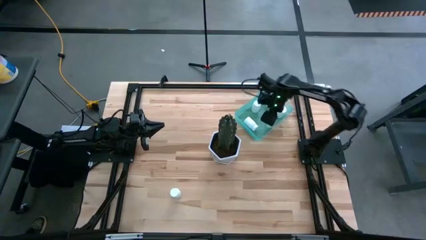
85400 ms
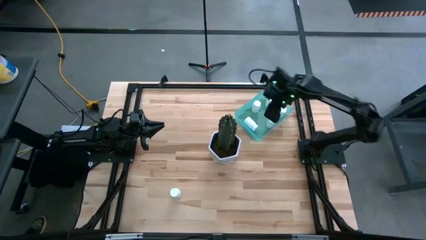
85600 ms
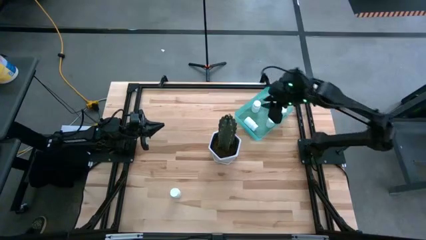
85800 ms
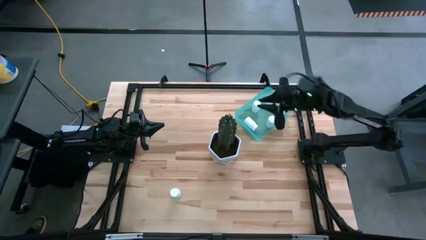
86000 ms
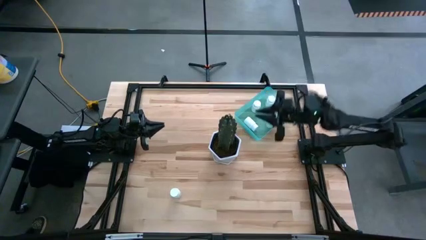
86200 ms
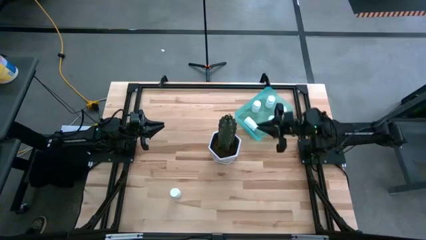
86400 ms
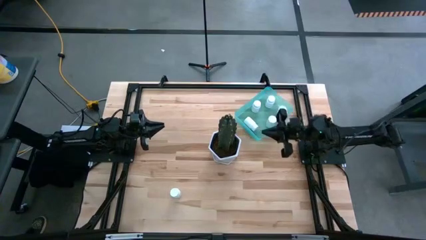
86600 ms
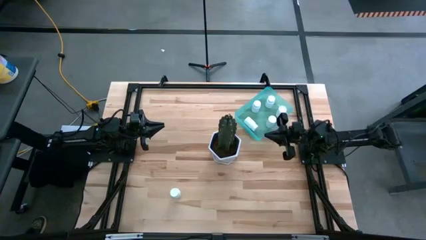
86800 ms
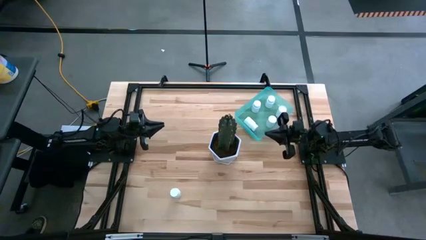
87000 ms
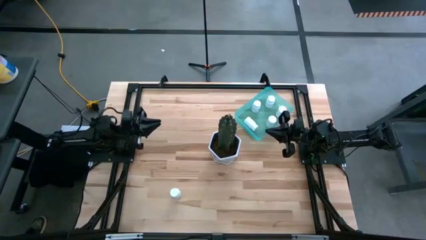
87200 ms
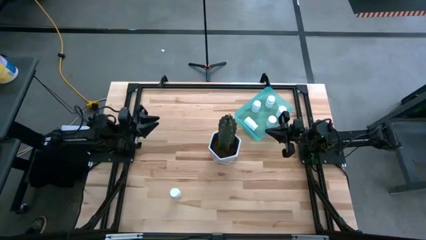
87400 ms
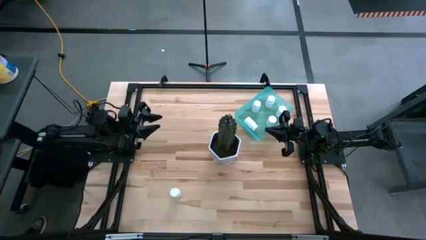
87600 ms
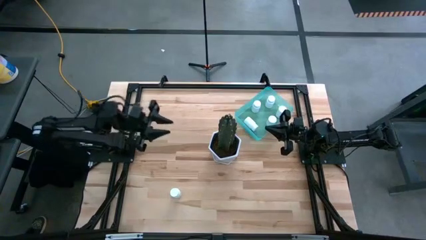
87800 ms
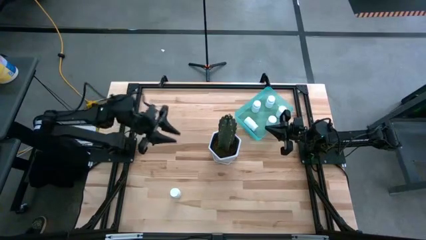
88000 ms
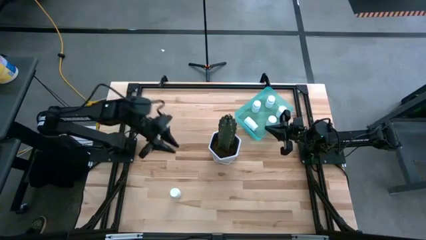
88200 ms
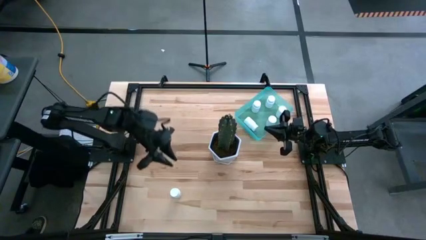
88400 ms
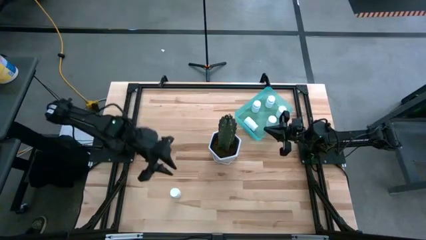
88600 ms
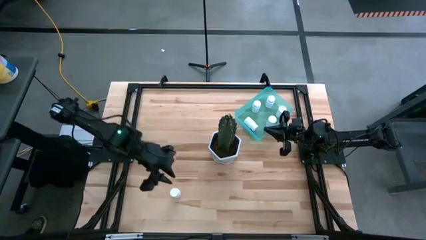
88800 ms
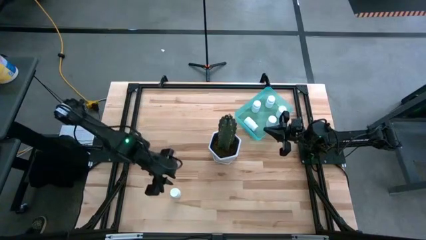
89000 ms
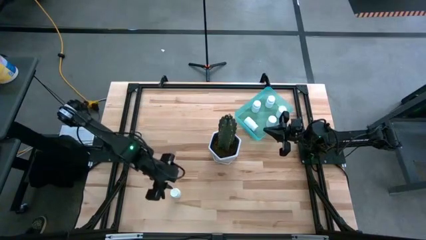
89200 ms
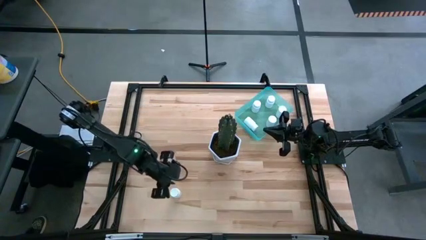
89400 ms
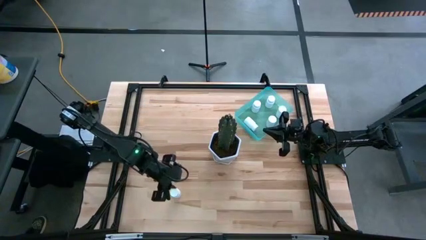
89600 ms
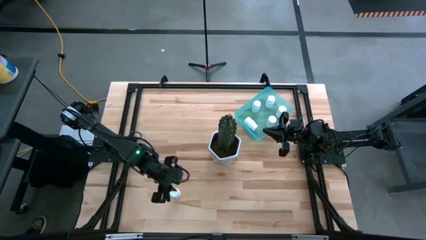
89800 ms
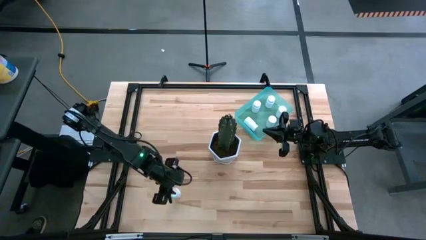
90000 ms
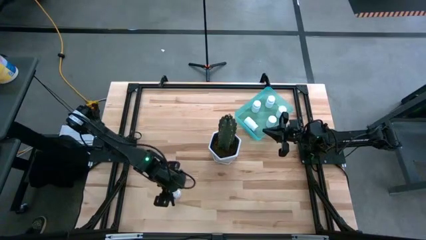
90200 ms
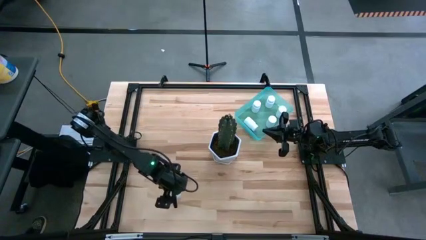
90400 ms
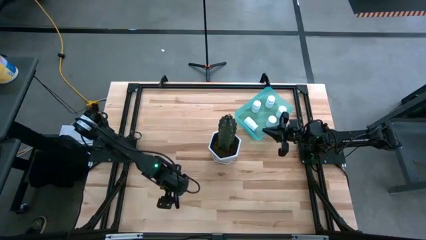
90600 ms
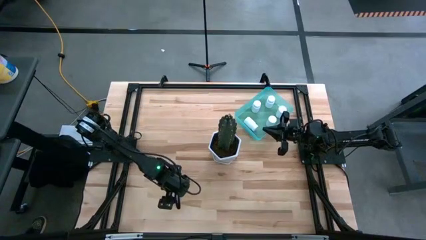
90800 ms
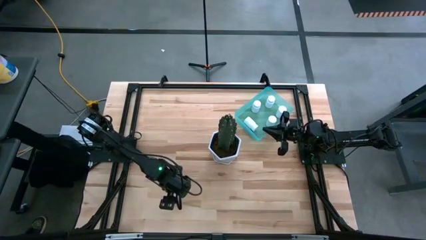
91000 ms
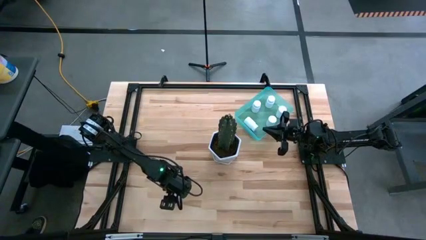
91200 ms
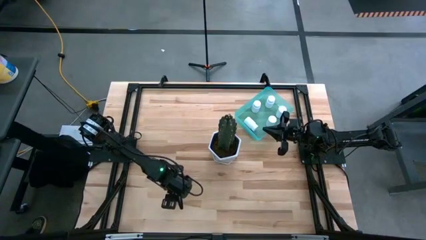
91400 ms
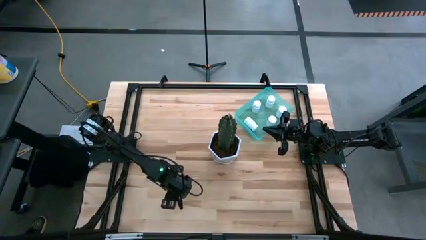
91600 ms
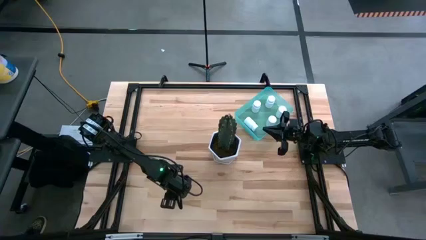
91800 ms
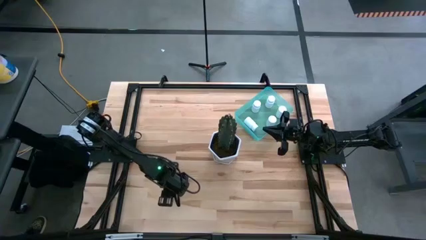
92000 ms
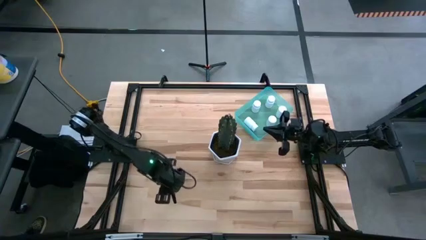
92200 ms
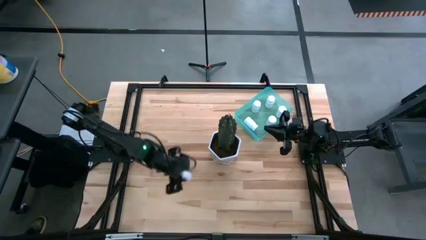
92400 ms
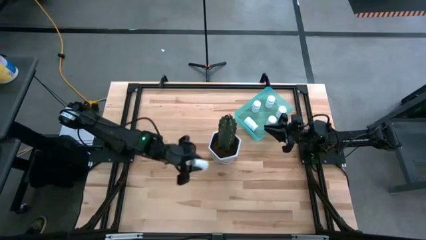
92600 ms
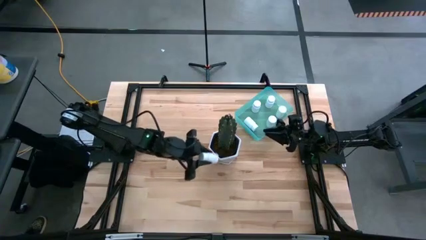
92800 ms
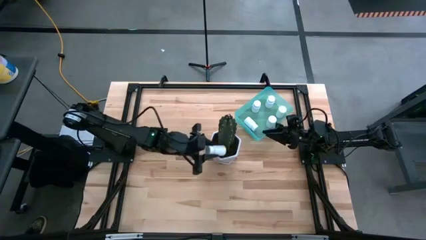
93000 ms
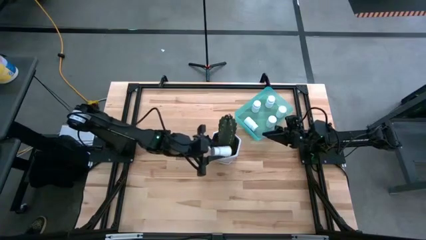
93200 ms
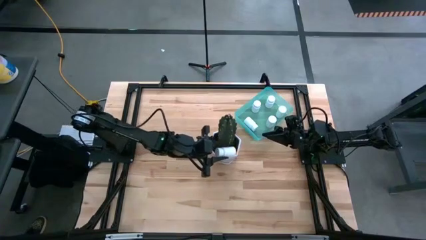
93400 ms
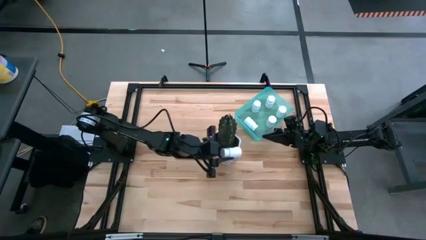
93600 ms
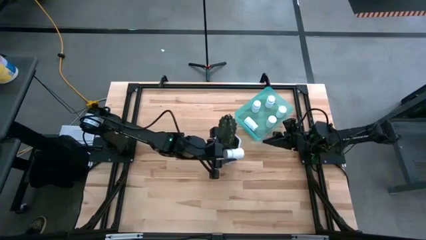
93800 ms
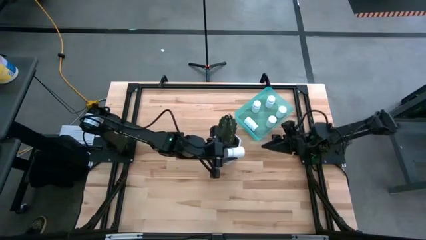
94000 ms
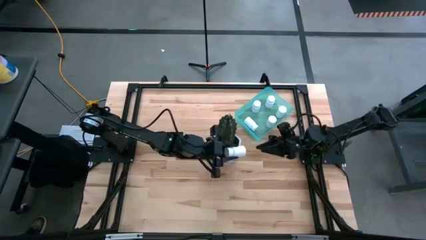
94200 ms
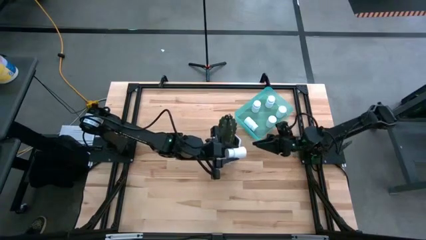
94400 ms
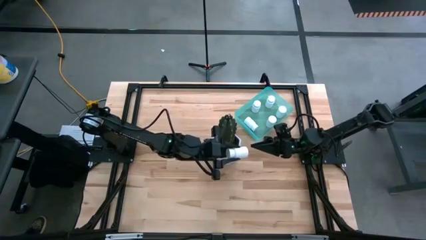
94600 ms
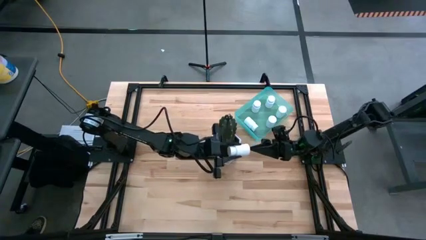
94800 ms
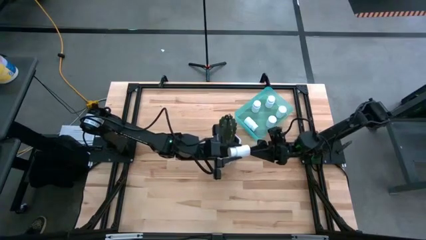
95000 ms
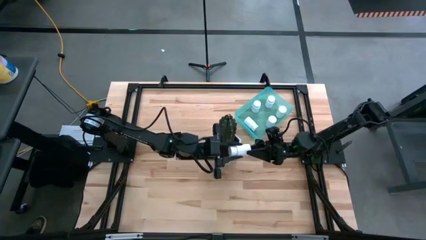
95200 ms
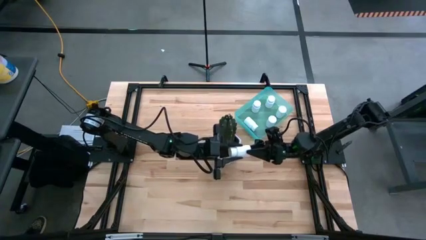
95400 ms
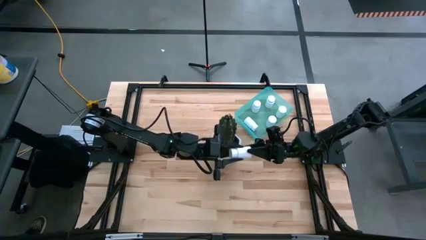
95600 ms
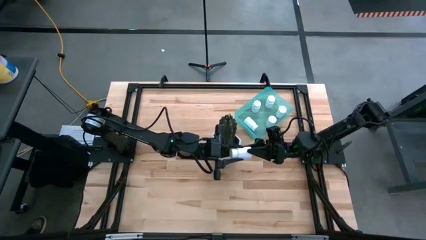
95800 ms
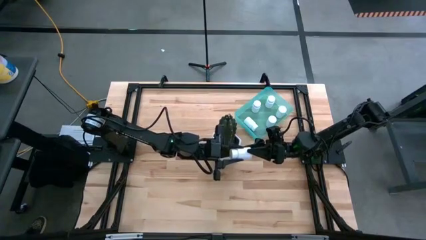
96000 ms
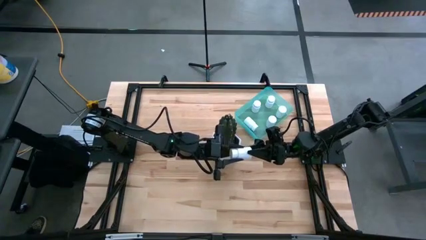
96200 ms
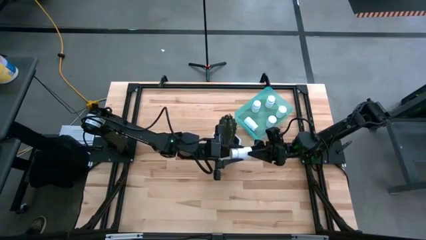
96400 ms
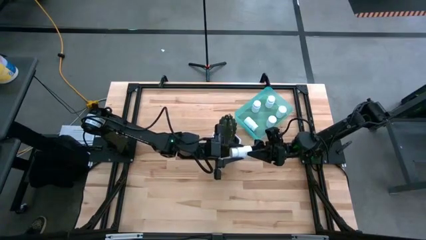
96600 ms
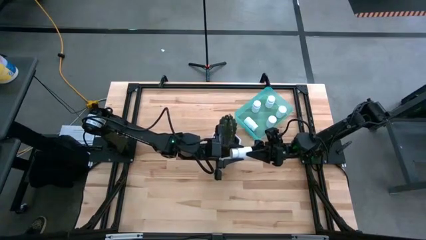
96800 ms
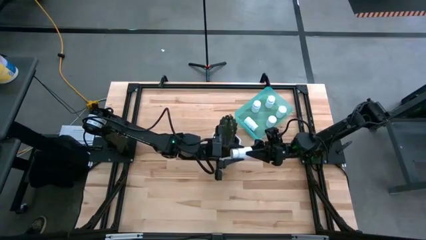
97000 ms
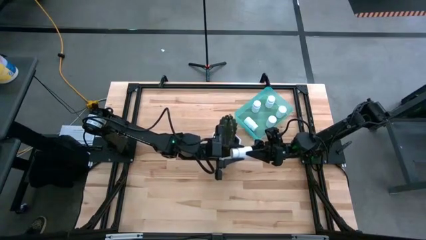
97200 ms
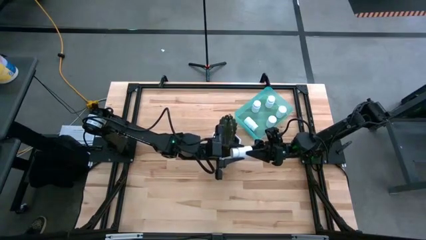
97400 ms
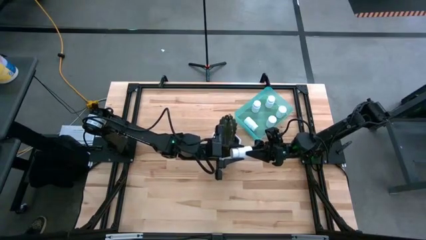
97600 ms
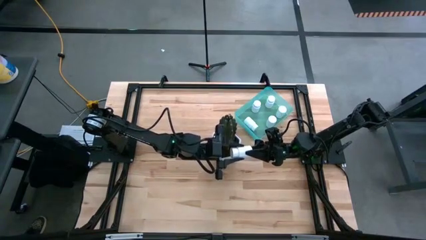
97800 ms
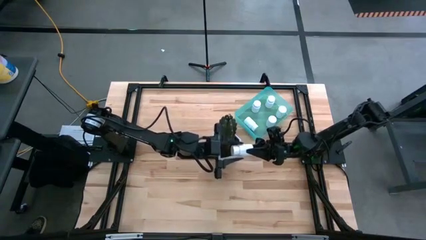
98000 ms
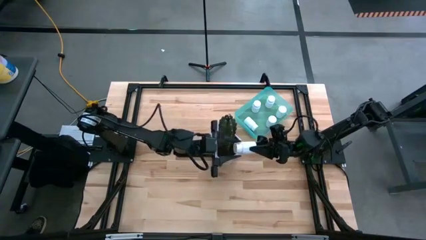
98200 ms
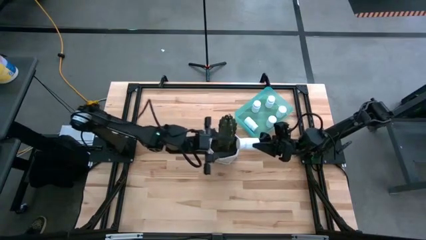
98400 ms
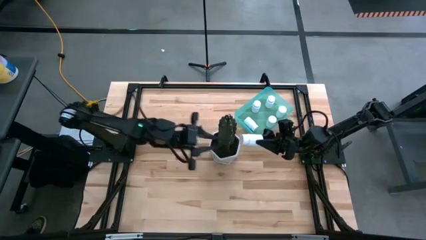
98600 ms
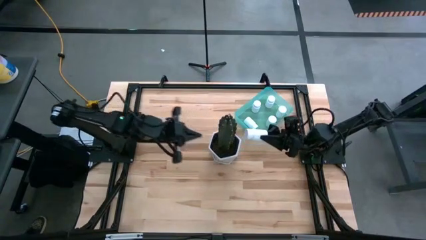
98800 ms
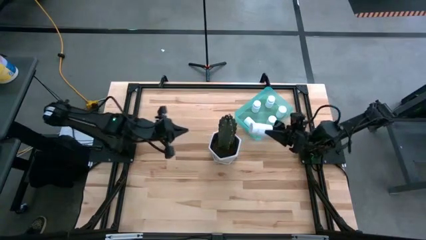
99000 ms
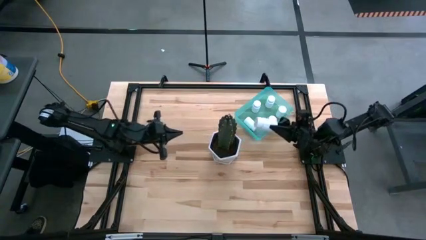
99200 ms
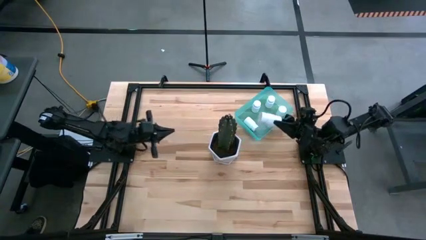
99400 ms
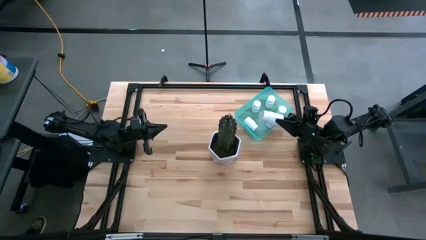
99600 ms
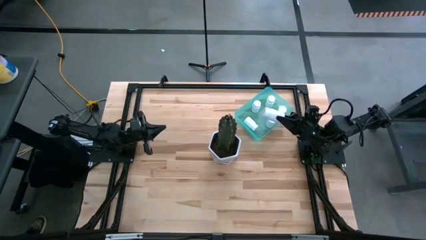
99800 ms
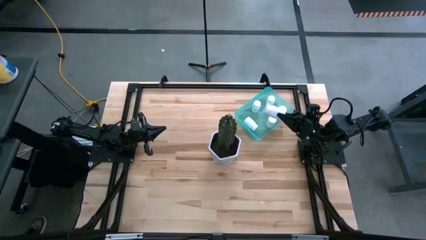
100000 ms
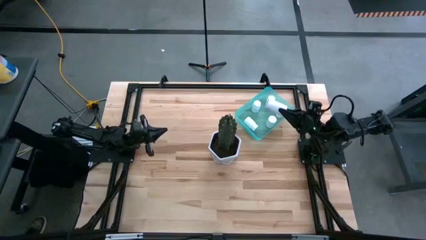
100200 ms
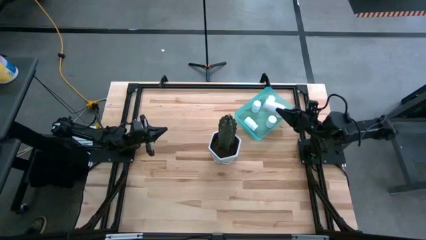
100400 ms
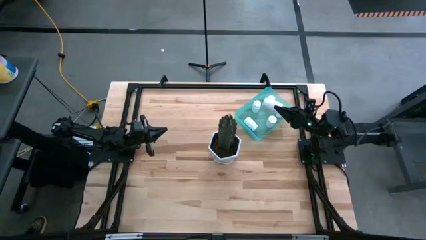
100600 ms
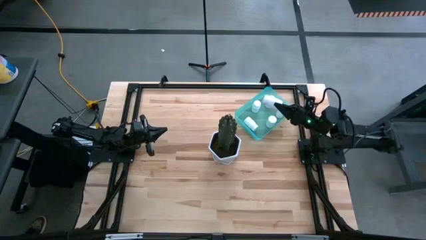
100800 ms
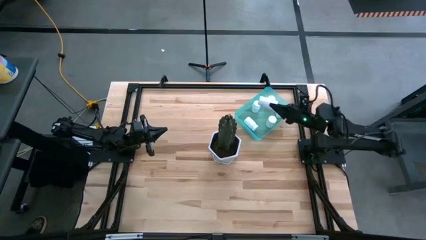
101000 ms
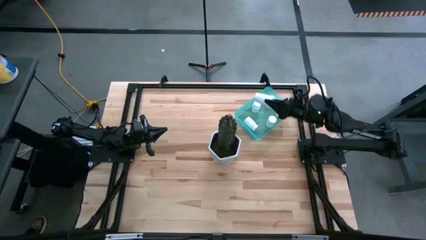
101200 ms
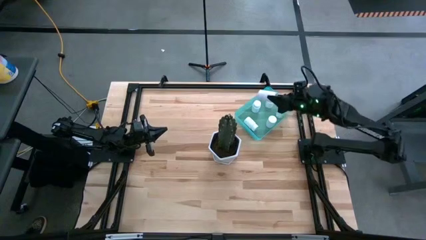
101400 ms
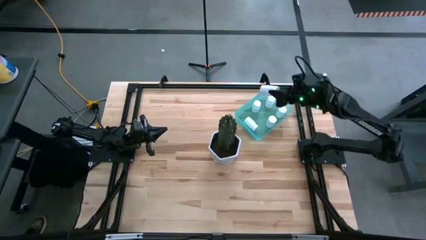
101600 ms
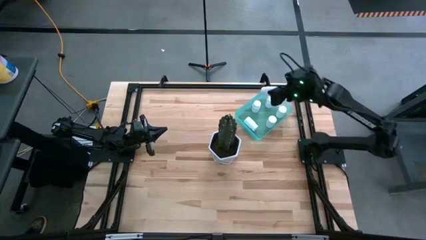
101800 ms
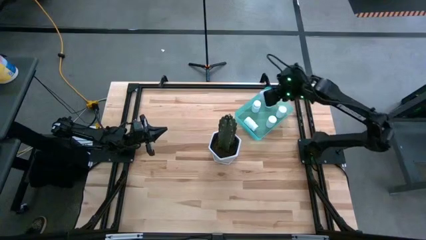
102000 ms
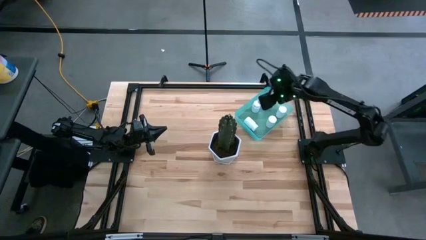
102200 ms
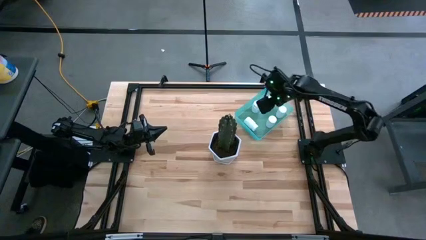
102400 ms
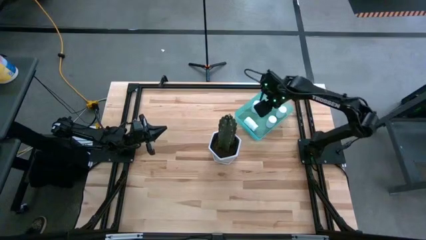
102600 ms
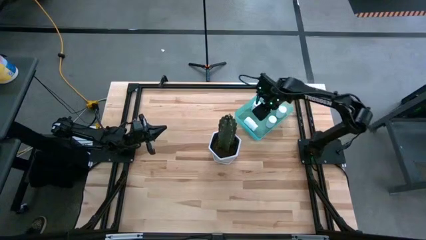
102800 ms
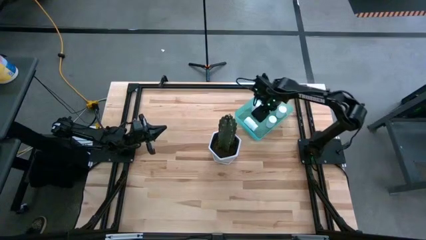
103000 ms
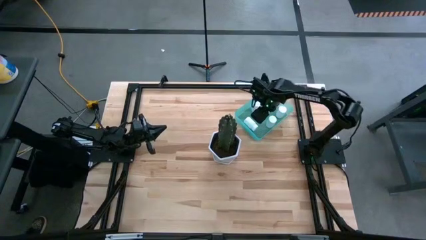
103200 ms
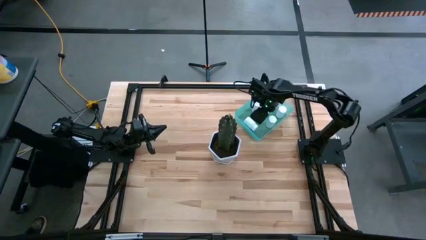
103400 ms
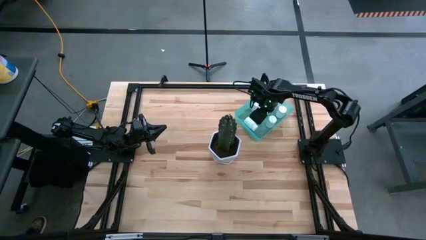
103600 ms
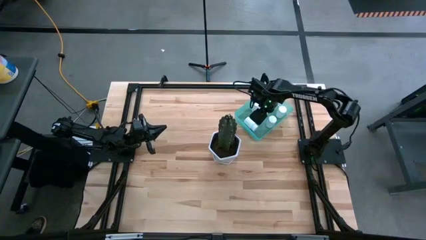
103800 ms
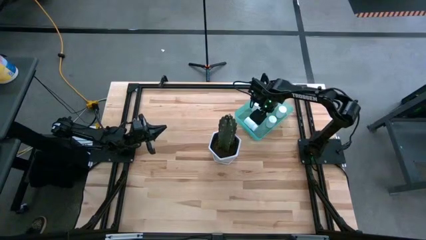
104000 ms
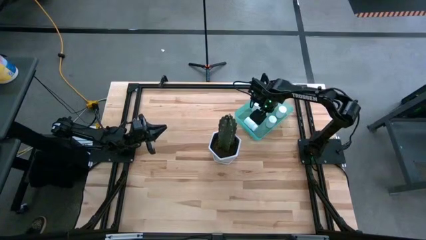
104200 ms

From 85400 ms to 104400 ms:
Task: Pick and place pill bottles into a basket
Put the white medicine bottle into the blue bin
